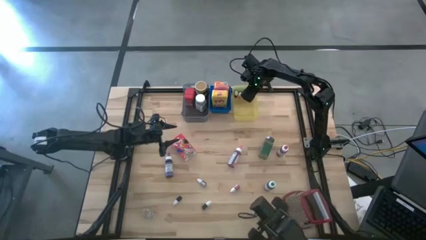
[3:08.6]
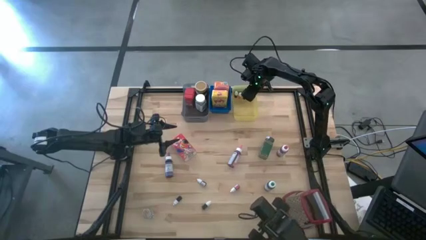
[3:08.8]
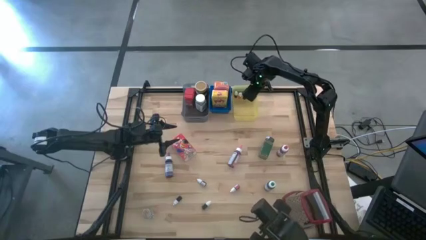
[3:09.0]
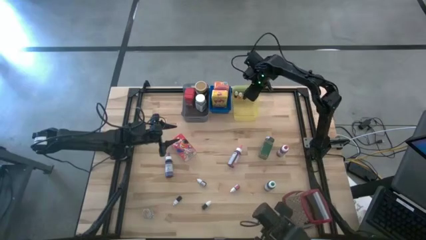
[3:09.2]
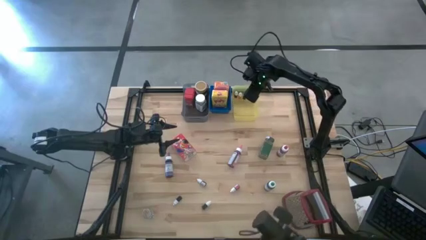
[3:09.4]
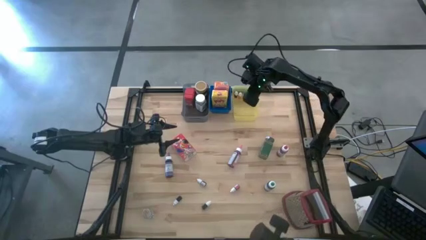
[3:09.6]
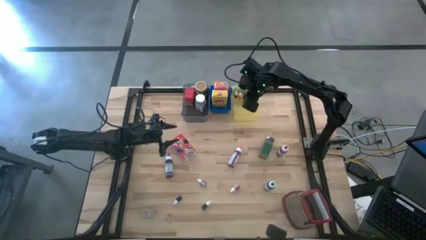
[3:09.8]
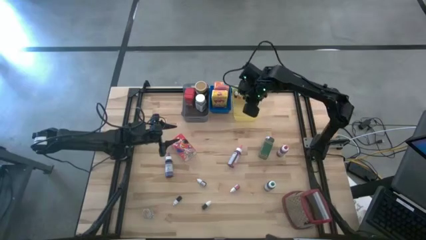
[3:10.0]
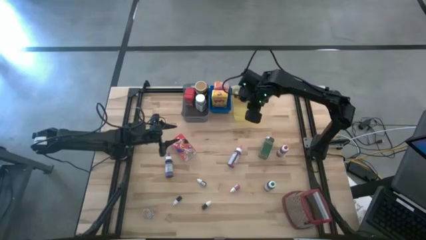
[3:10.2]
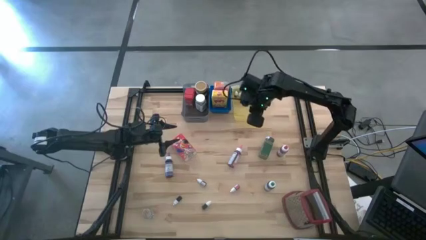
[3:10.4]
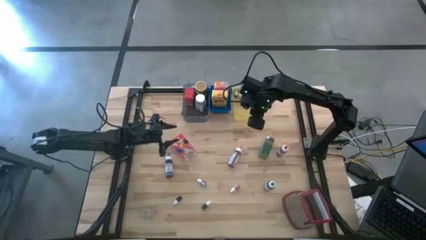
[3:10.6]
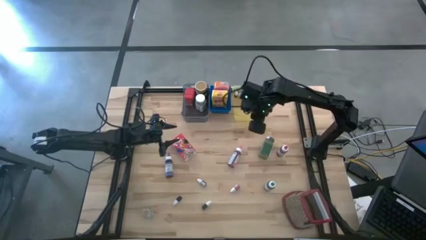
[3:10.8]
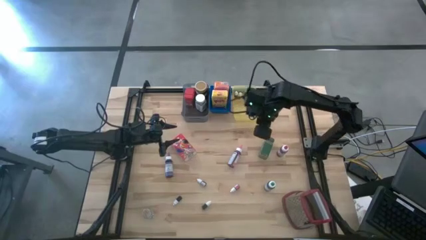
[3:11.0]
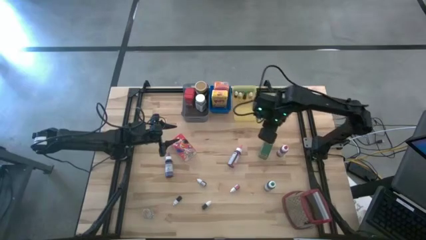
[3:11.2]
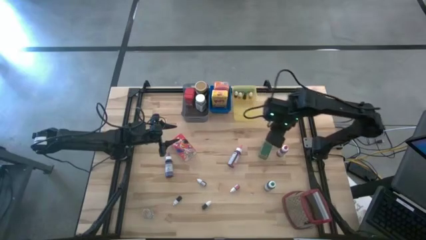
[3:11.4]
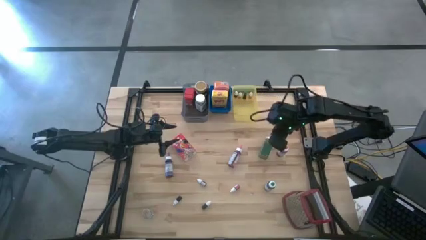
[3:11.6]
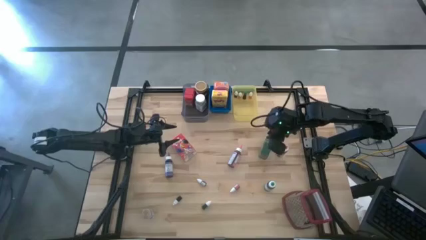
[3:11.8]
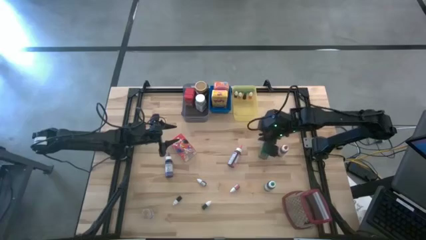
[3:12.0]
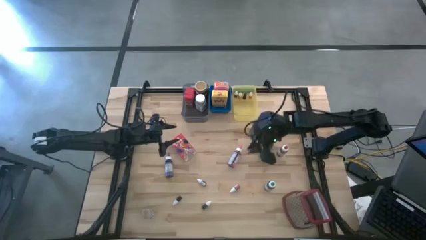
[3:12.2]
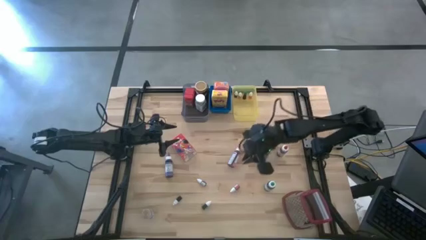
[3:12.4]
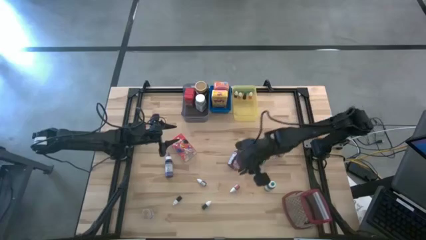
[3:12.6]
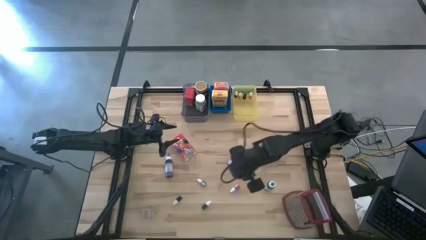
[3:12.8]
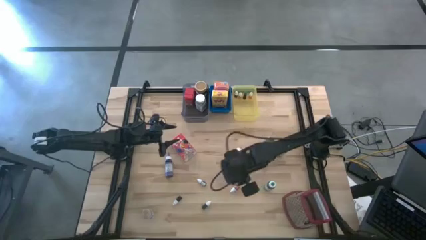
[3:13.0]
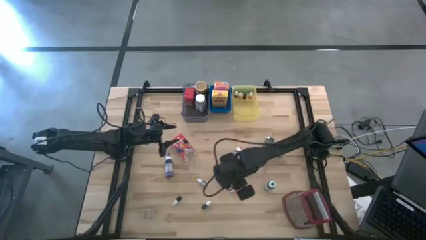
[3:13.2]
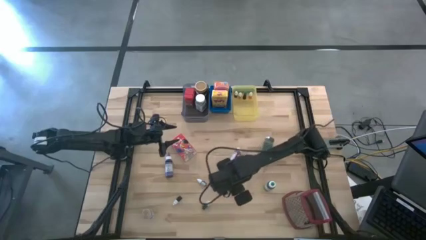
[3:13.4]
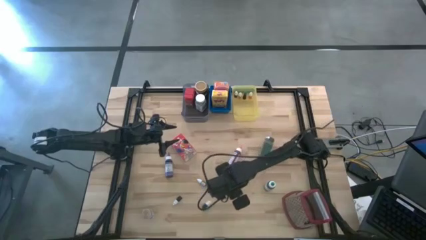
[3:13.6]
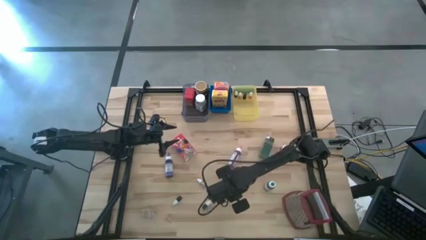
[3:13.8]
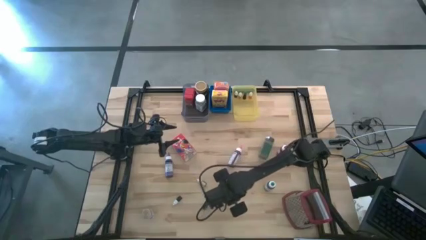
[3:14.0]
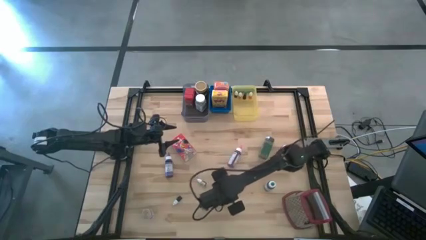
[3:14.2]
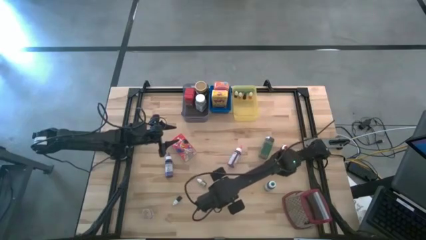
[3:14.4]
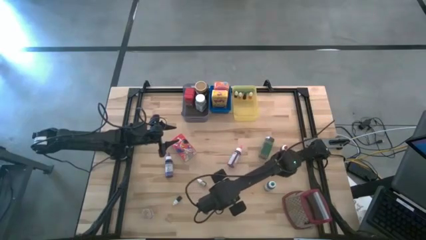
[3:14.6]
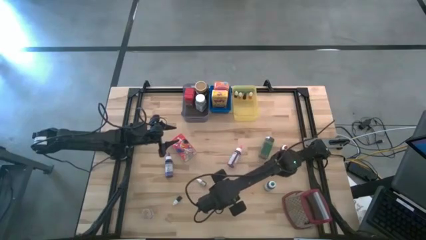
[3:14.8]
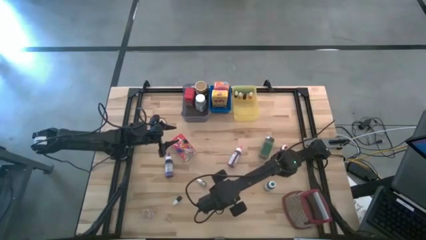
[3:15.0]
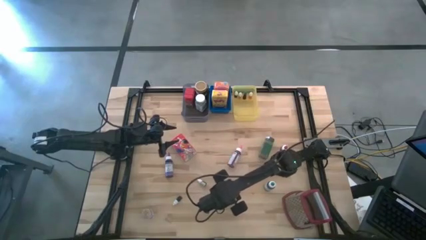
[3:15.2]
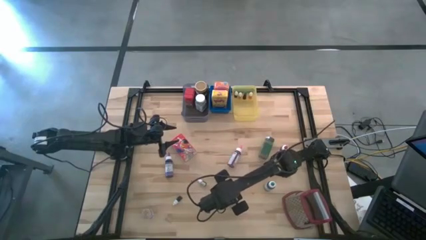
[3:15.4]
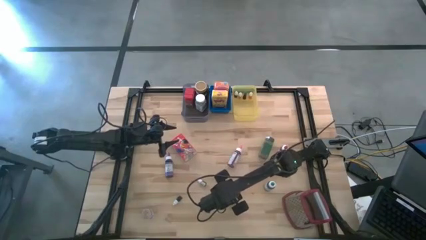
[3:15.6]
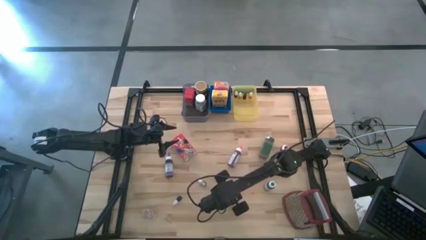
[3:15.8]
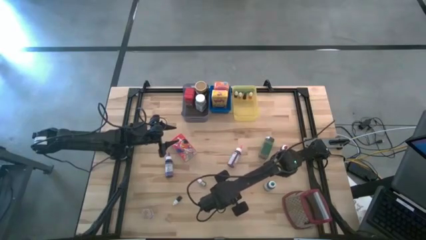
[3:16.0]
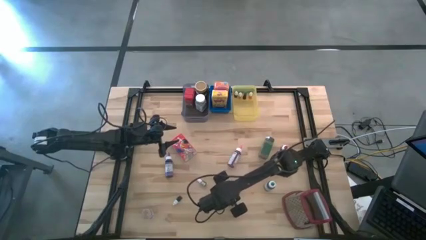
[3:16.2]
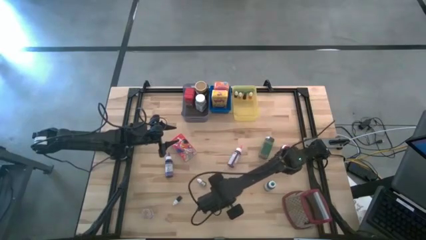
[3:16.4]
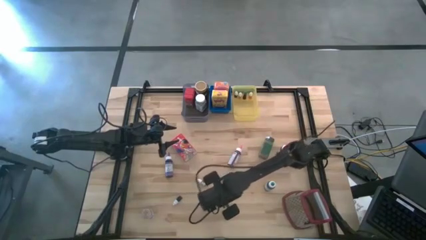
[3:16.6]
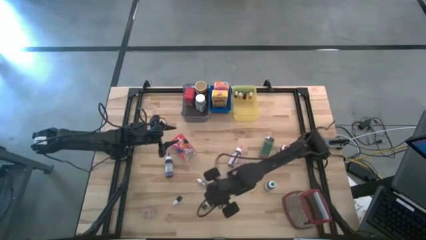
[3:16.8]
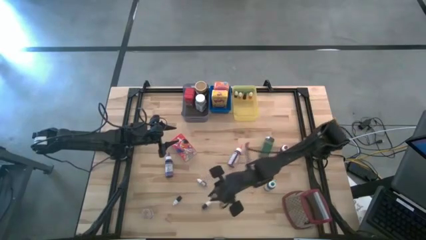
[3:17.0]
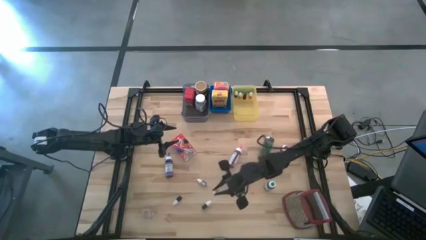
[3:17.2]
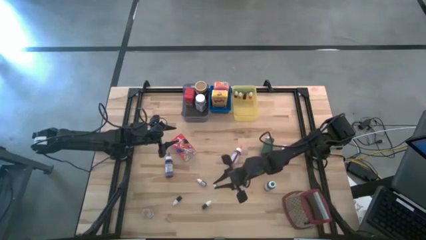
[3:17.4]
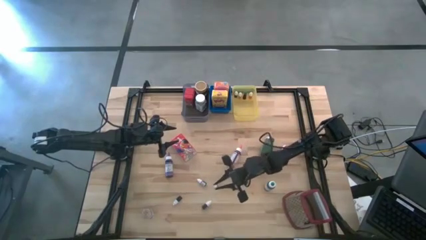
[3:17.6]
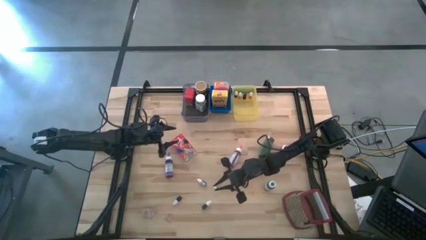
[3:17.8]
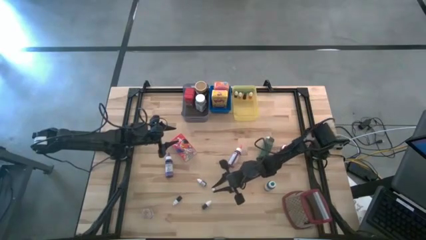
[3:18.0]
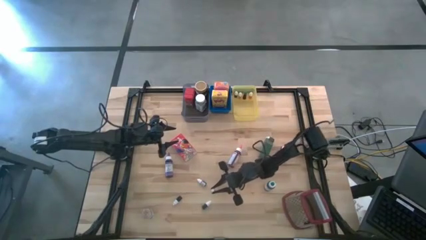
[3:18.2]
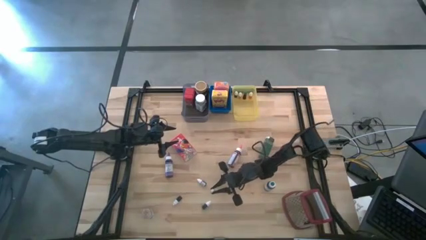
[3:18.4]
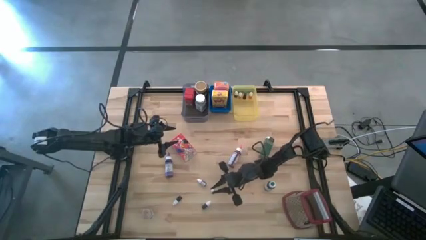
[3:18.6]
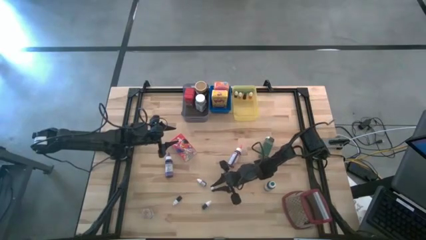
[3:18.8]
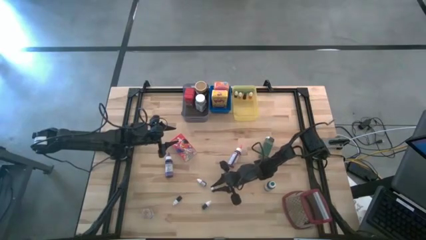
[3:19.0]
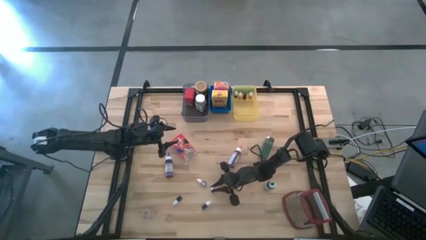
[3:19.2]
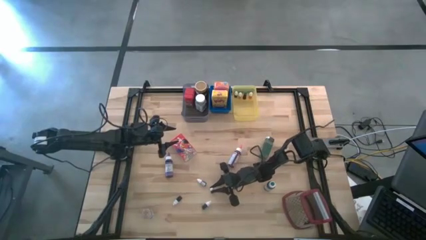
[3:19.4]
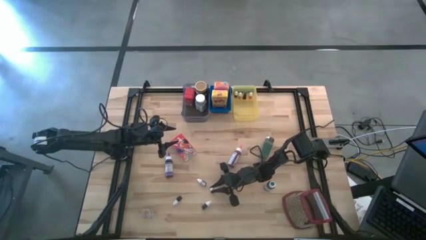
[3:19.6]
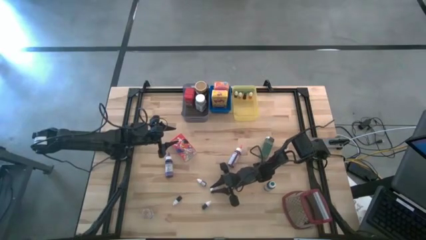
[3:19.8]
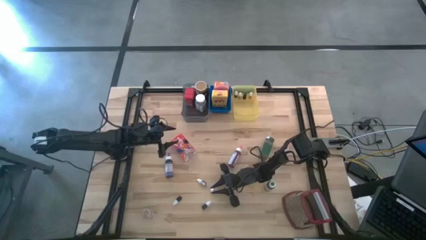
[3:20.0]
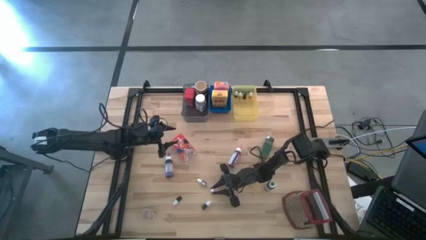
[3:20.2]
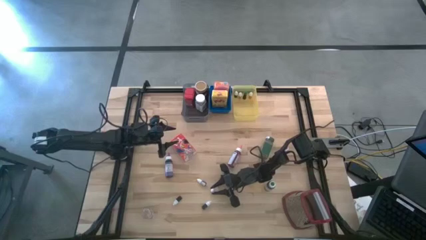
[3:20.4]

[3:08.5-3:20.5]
Task: Pick & Place Kitchen Items
Adjust the right small pink food coloring bottle

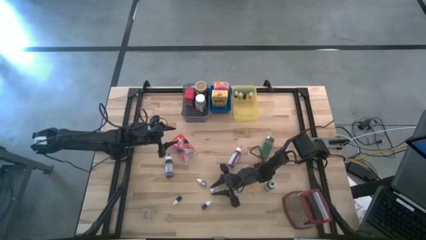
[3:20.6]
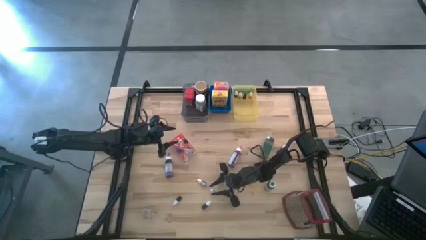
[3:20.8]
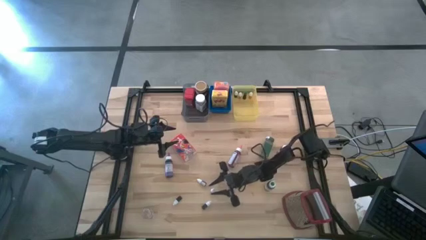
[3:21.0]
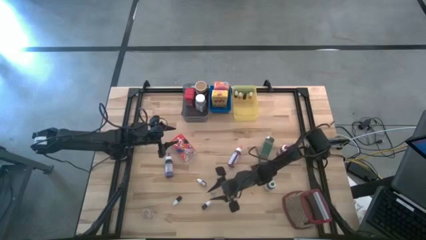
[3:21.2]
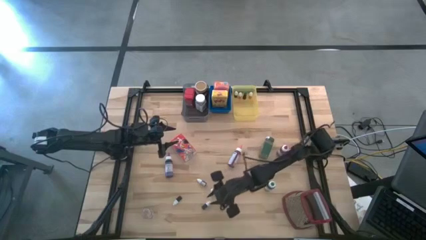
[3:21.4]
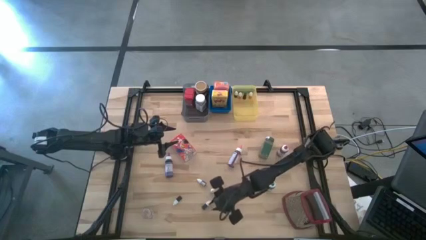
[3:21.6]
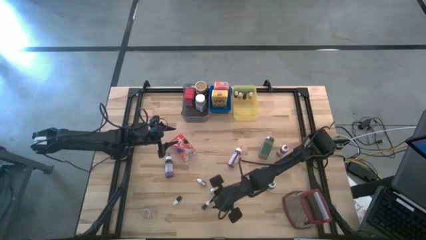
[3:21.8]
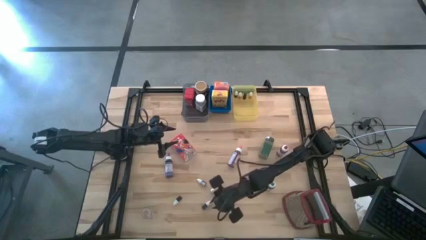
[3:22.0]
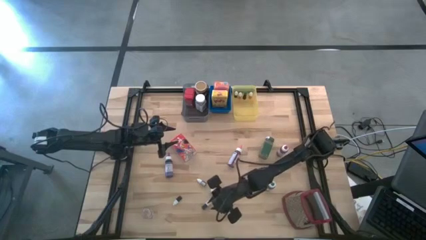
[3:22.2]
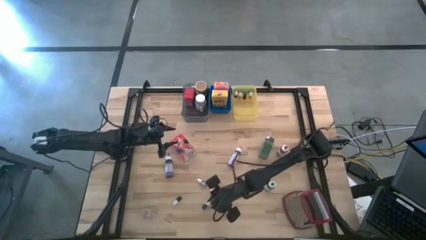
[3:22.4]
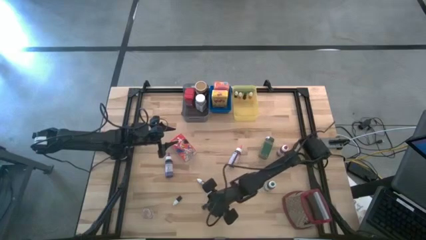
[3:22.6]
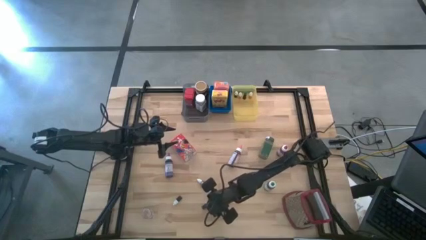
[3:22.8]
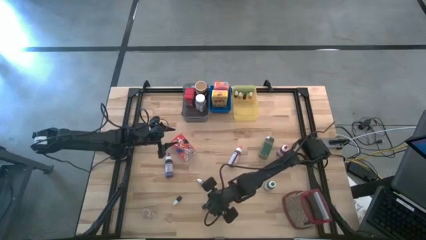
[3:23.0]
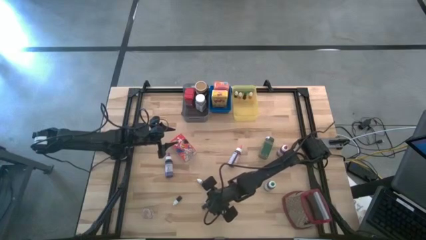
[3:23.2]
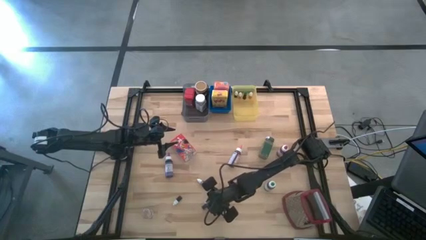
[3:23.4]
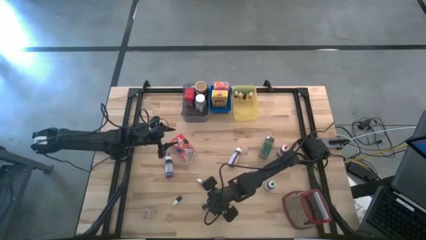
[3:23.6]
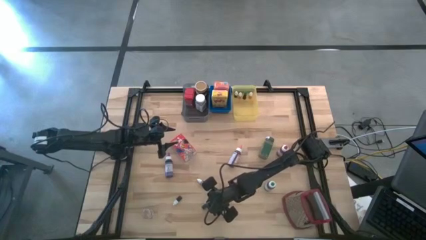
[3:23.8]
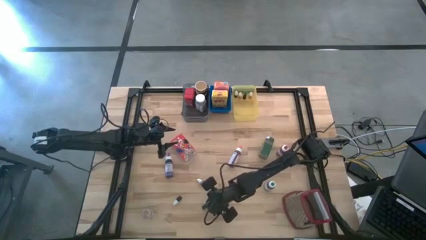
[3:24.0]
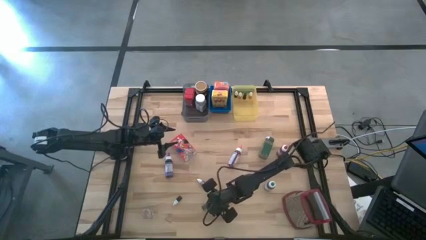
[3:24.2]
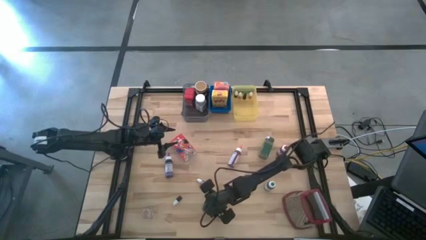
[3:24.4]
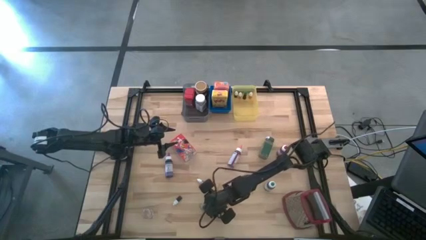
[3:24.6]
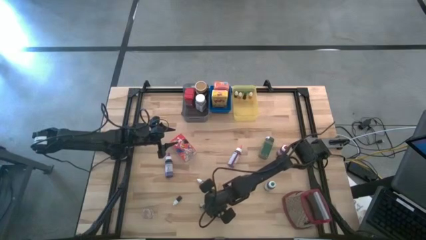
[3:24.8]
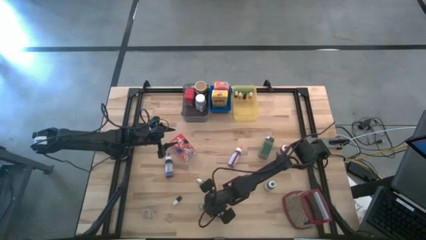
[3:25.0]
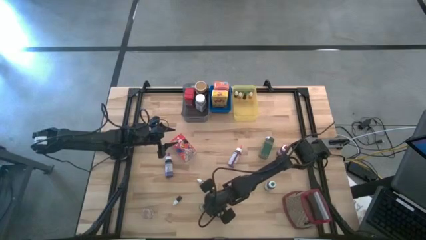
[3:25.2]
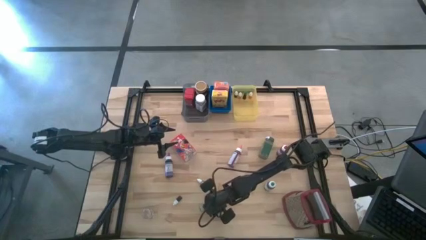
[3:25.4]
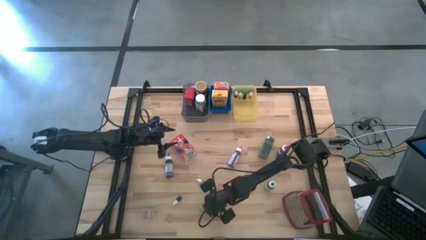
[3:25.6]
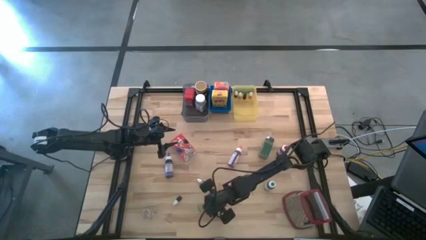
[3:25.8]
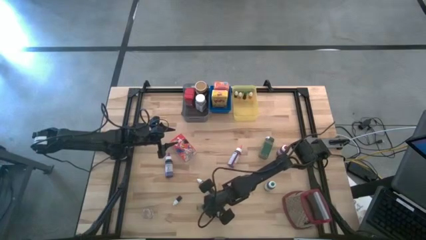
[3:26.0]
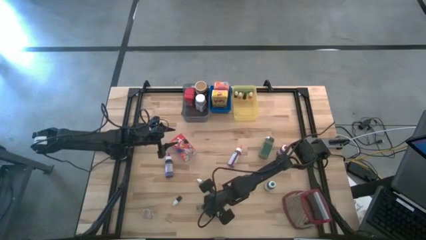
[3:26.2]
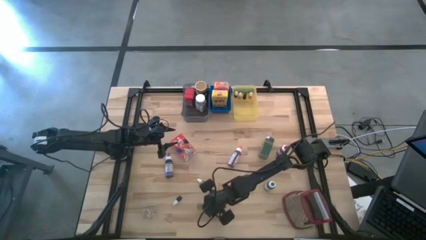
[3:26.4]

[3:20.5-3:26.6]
Move the small green food coloring bottle to the top right of the table
